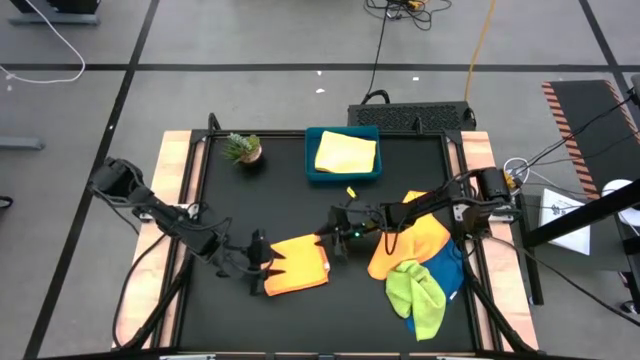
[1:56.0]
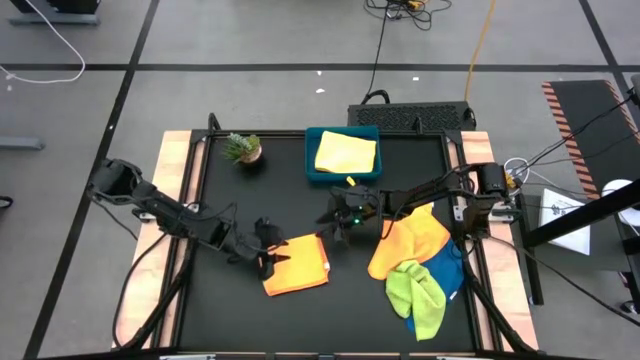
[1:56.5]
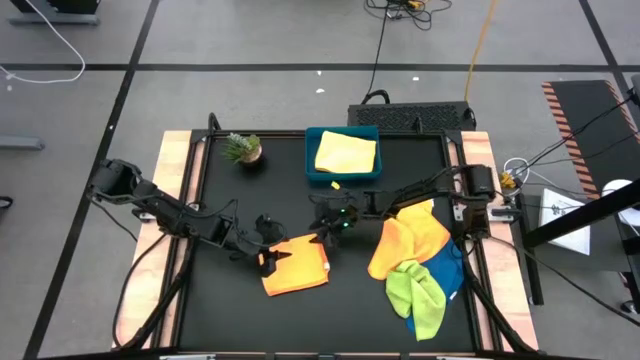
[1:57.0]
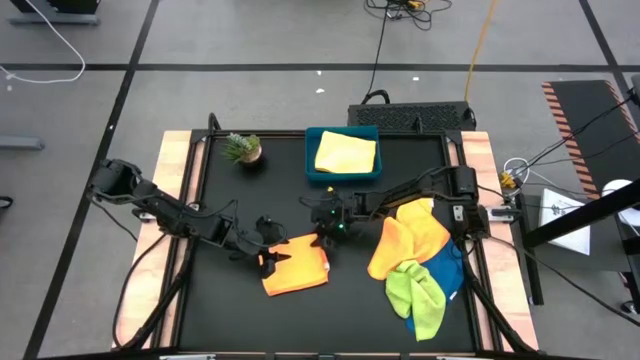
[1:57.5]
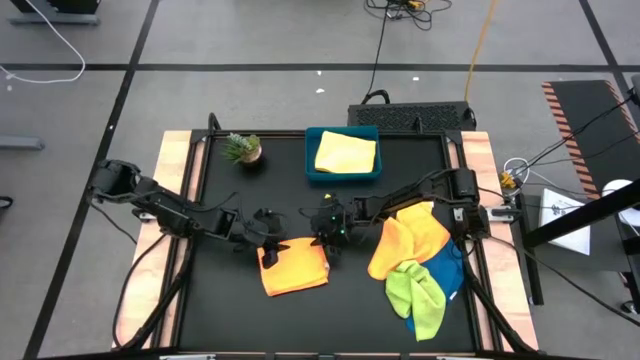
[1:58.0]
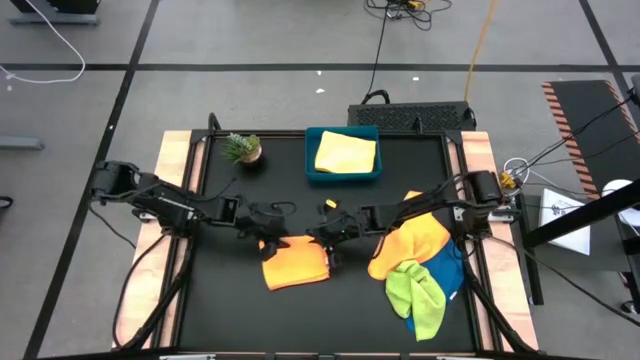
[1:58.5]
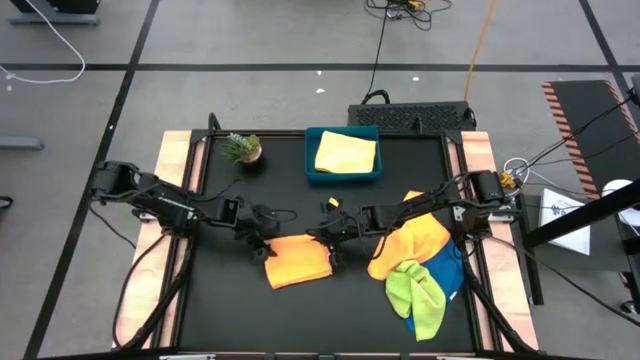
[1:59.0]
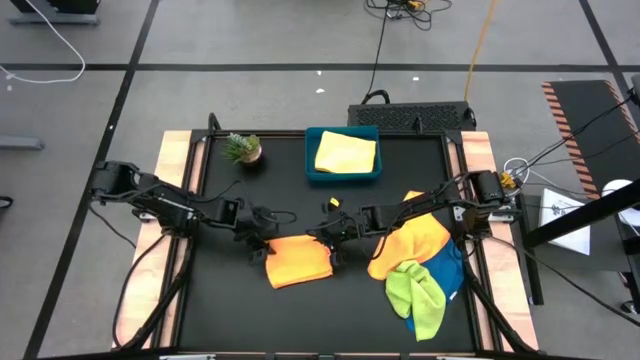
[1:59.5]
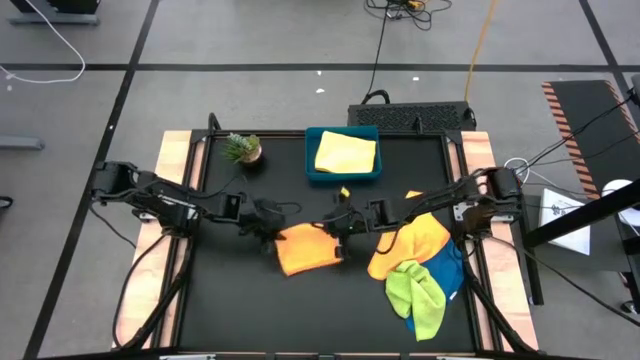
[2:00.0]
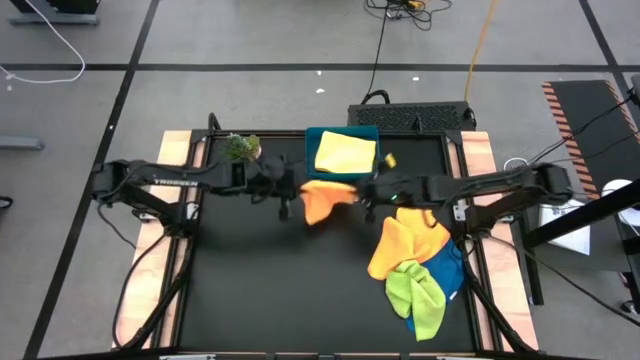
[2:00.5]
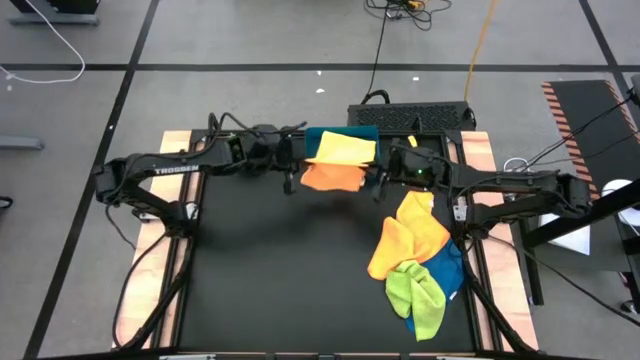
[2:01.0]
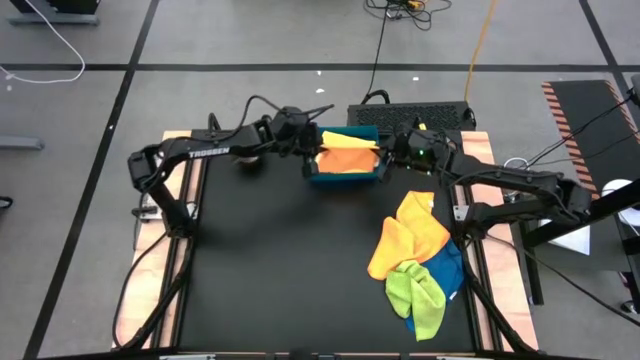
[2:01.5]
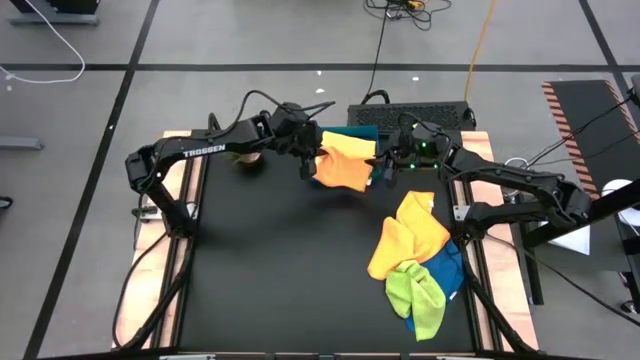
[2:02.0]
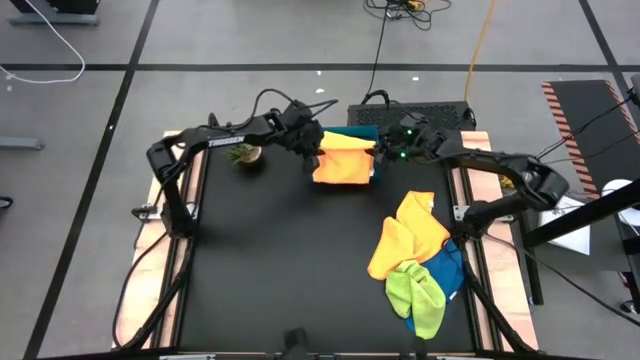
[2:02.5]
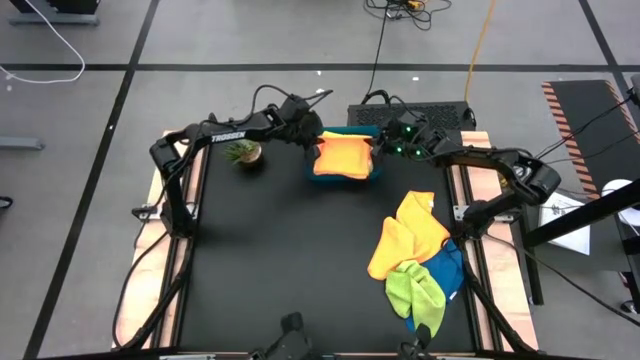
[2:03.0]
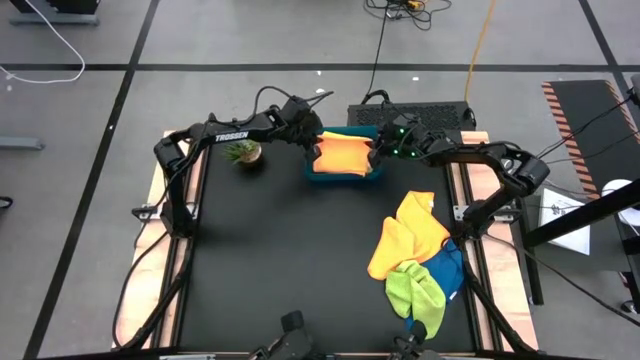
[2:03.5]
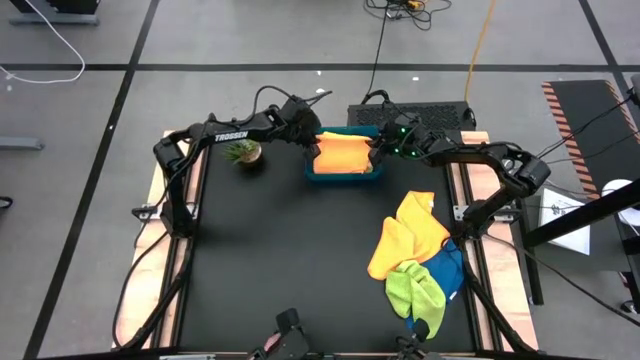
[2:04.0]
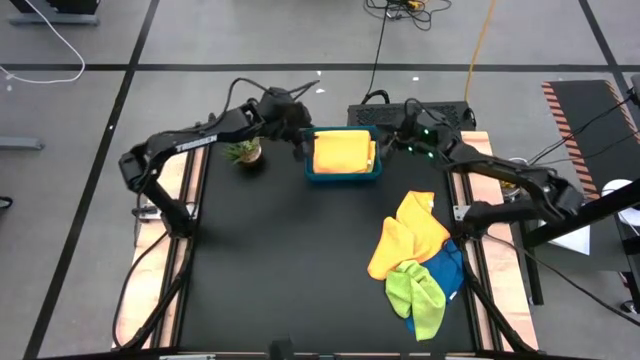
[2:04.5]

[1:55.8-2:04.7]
Task: Fold microfiber towels
Stack the left orange microfiber cloth on top of the yellow microfiber cloth into the blue bin

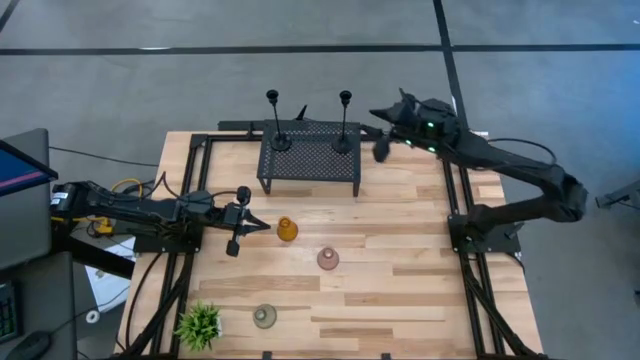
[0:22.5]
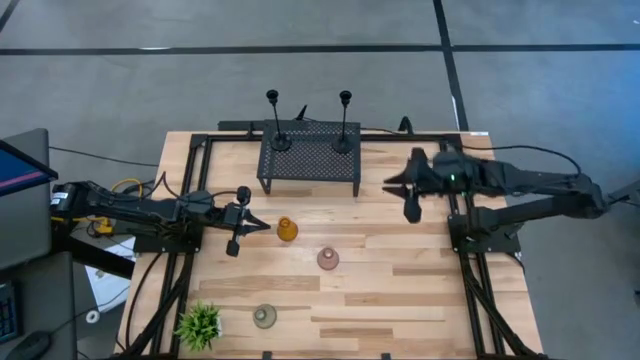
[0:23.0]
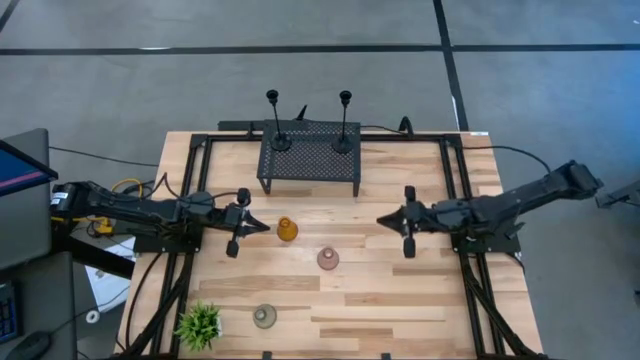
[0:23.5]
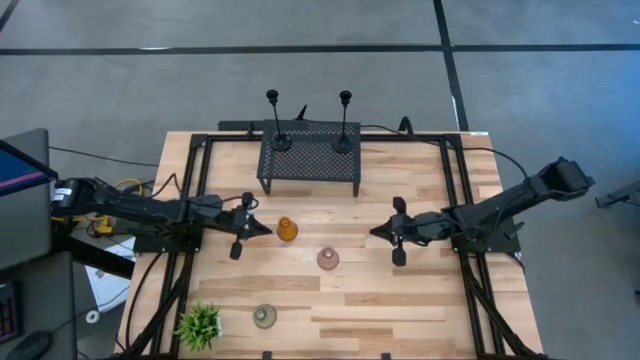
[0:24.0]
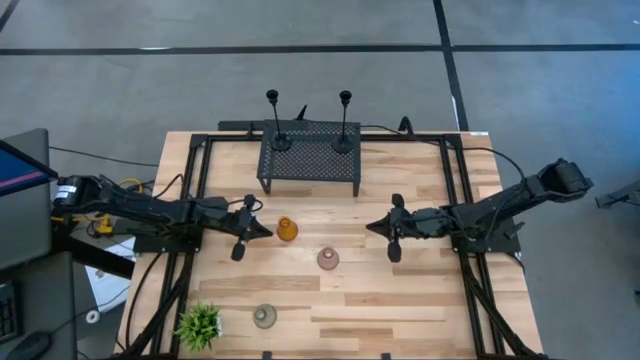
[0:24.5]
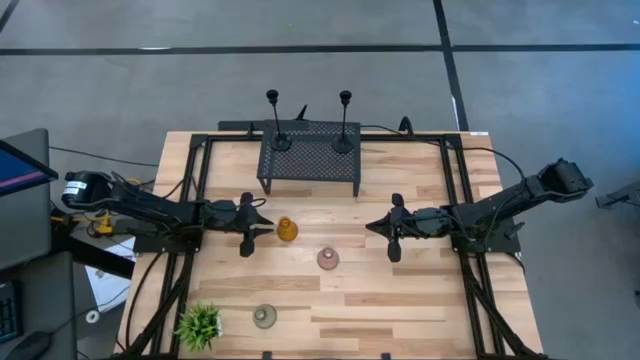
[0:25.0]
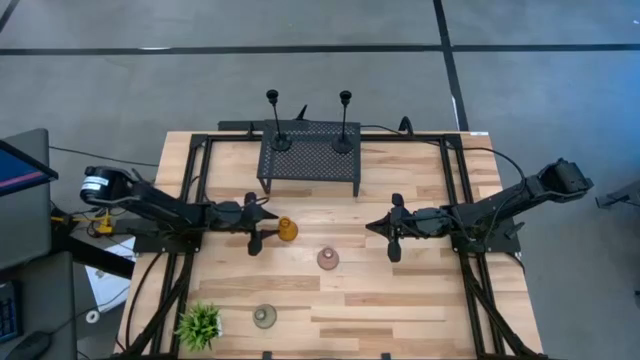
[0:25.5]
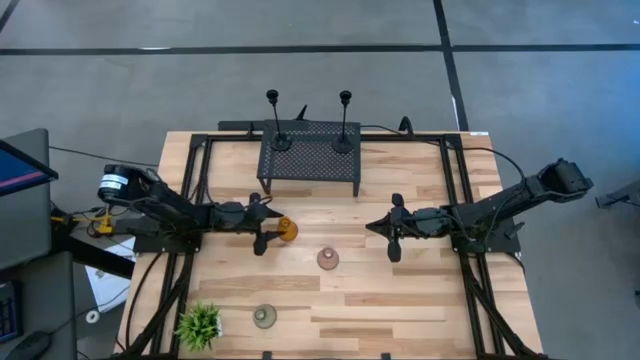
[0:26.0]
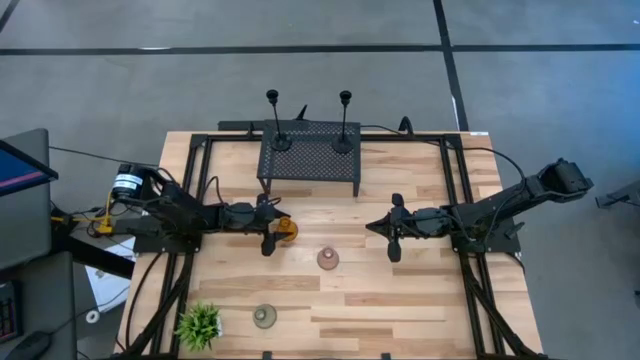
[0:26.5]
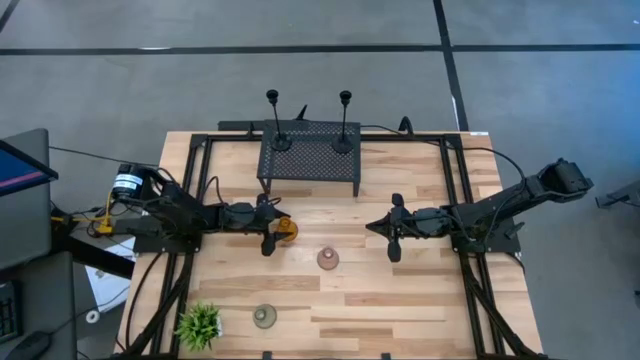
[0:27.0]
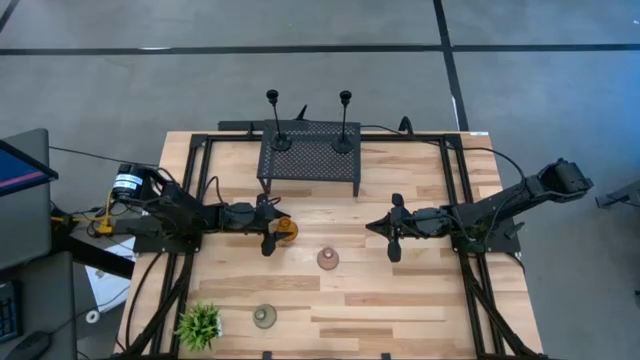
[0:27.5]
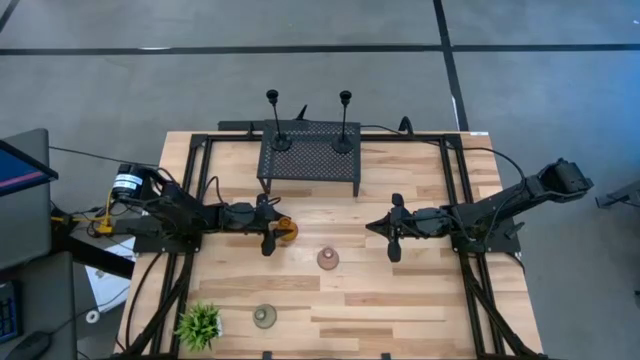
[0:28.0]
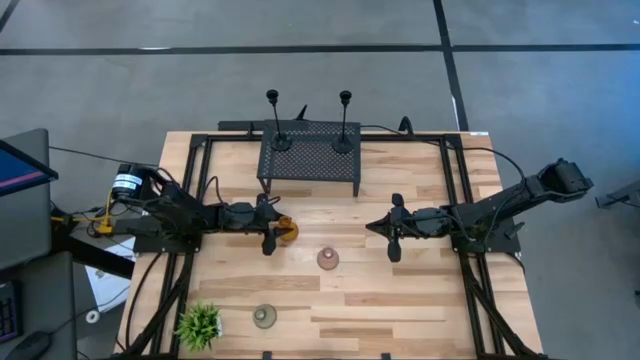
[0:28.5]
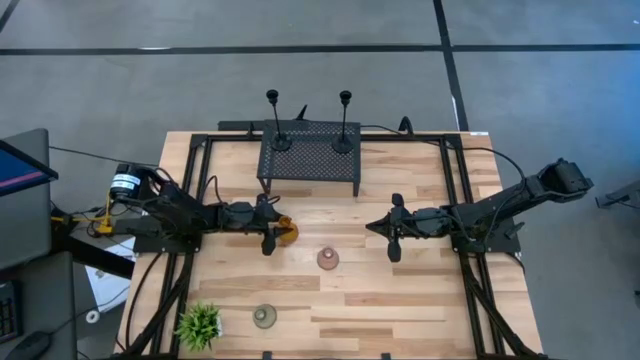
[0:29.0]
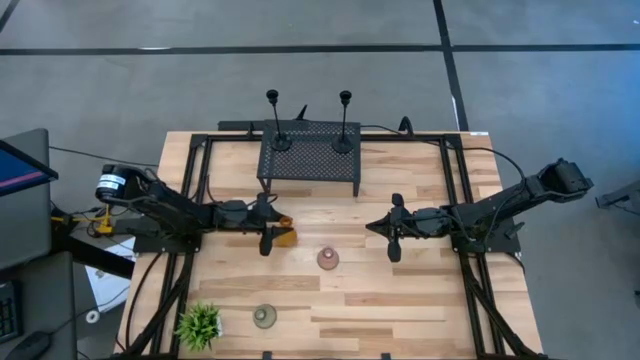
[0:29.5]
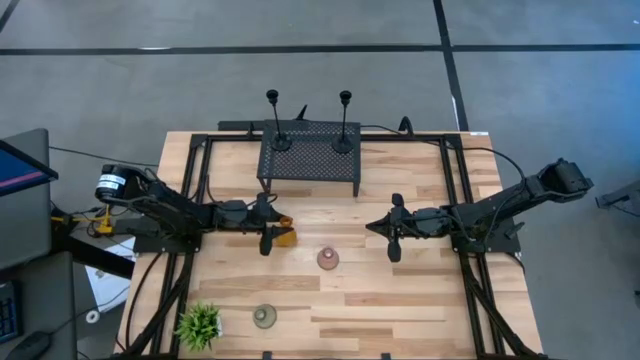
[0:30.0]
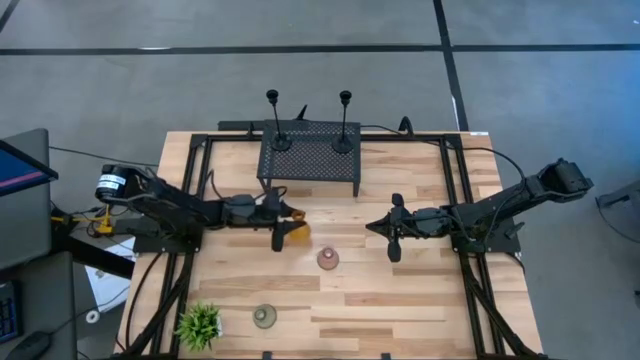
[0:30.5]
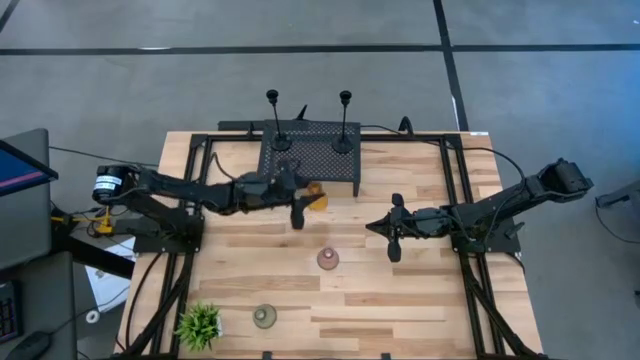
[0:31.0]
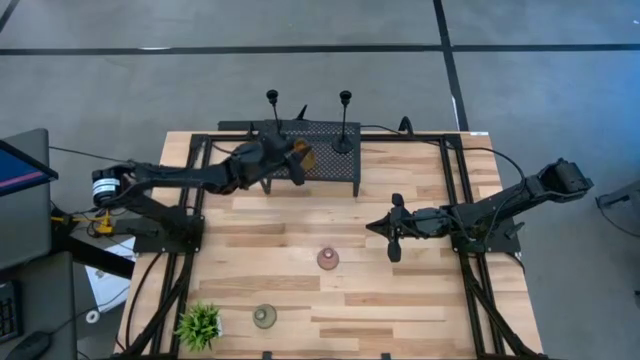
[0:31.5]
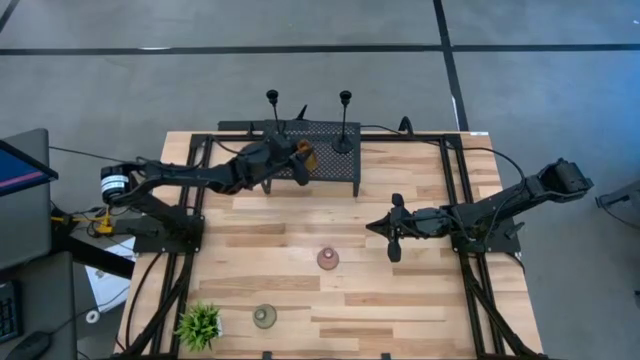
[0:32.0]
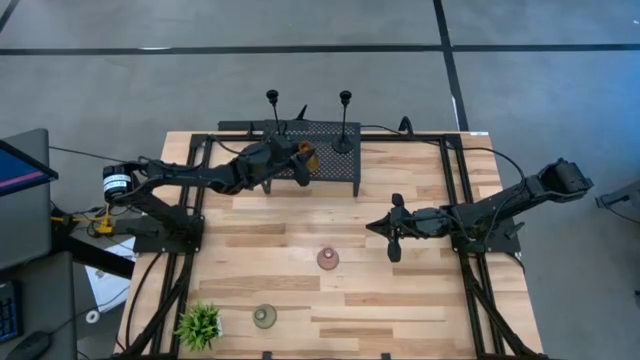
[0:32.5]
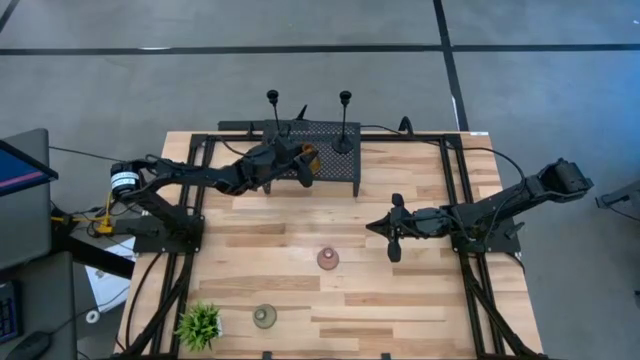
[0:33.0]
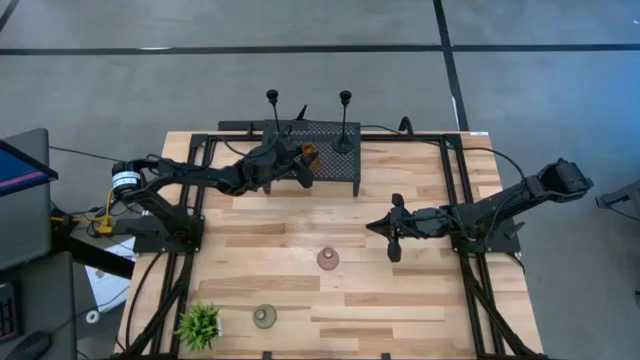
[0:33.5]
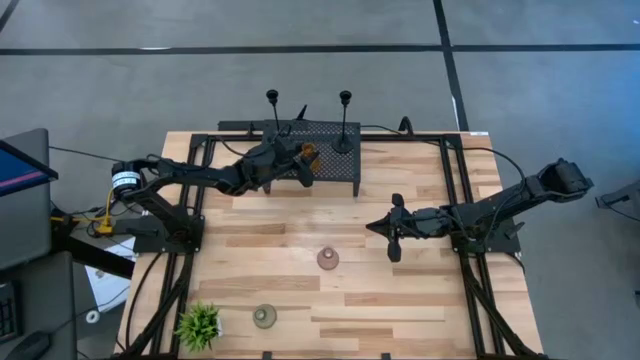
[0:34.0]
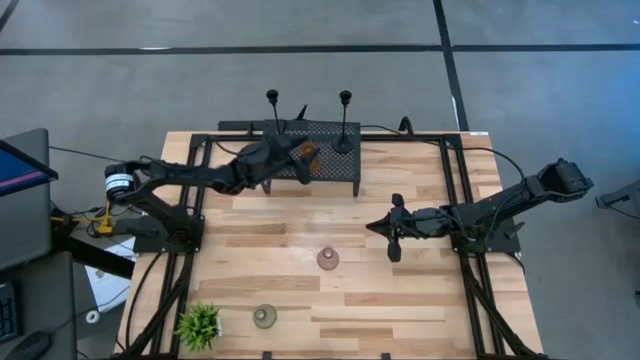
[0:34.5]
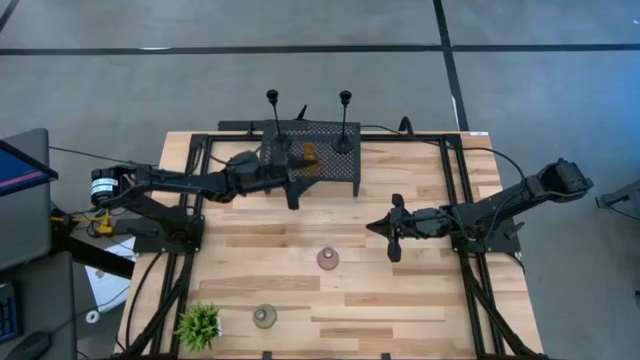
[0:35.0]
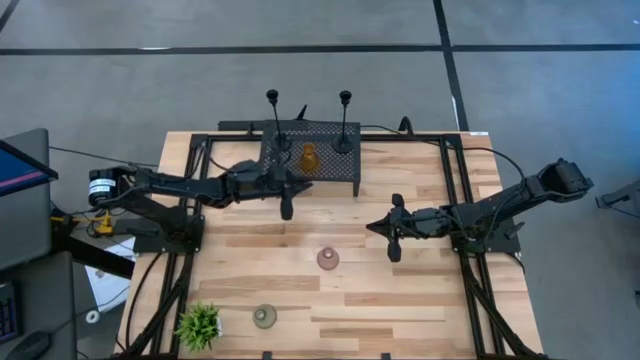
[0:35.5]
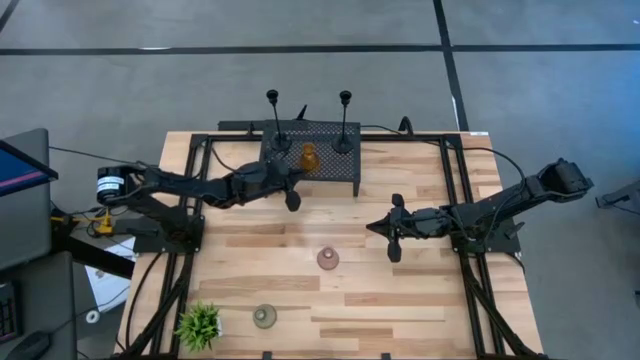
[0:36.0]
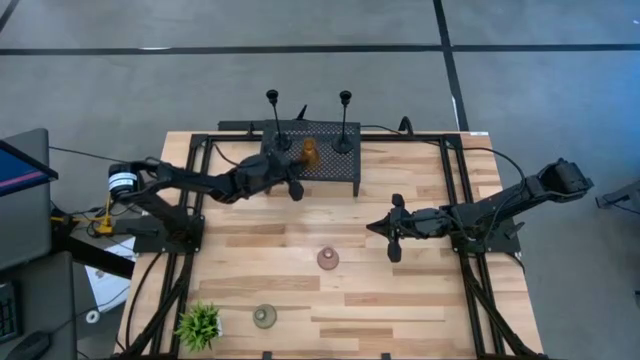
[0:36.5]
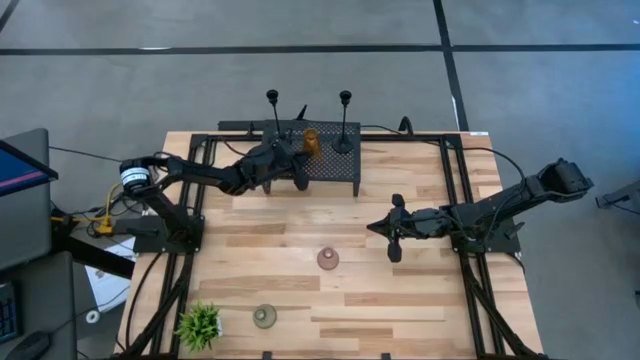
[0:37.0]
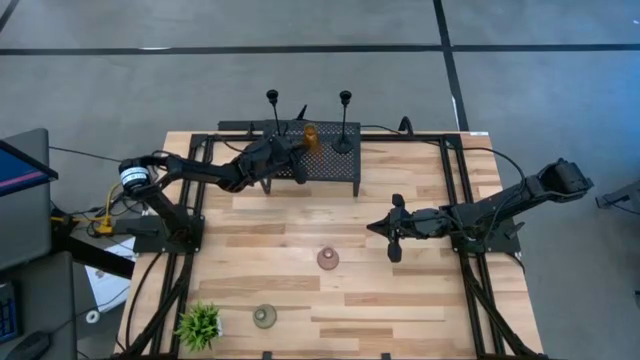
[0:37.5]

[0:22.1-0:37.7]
Task: Pick & Place candle stick holders
Put the brown glass candle holder on the shelf
